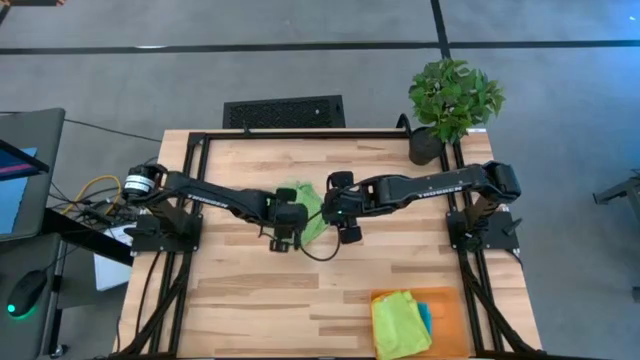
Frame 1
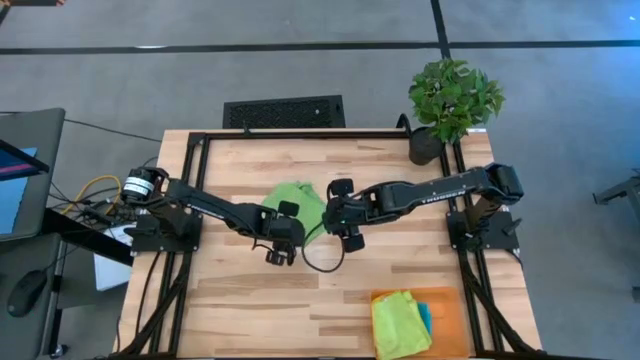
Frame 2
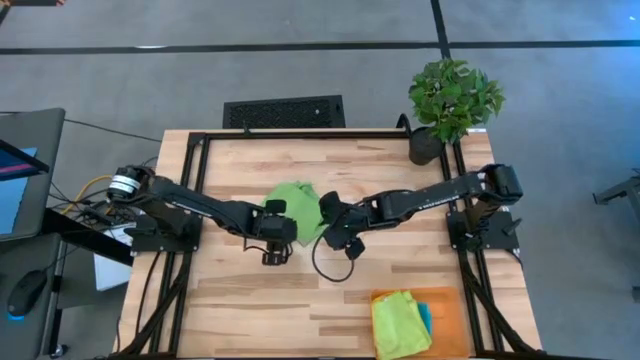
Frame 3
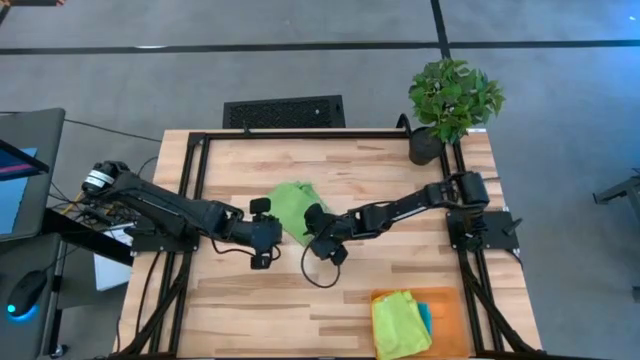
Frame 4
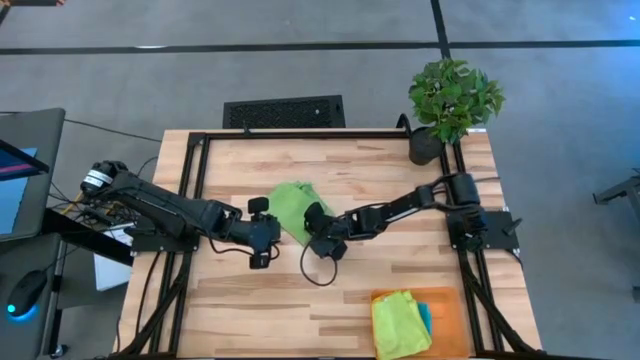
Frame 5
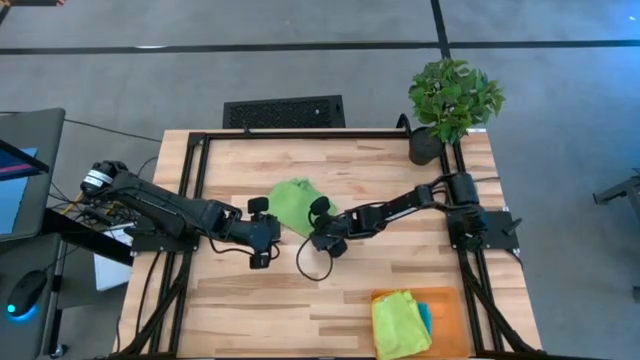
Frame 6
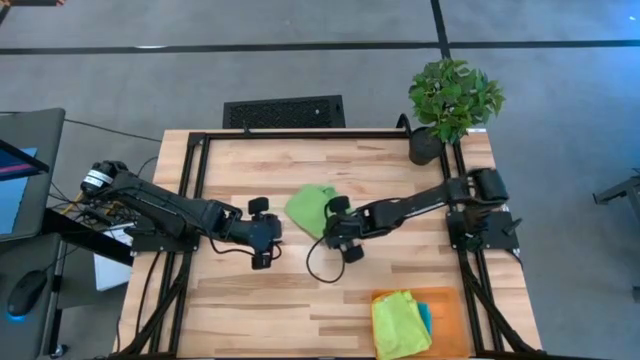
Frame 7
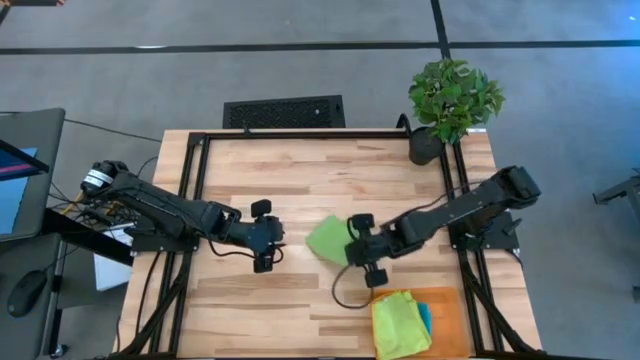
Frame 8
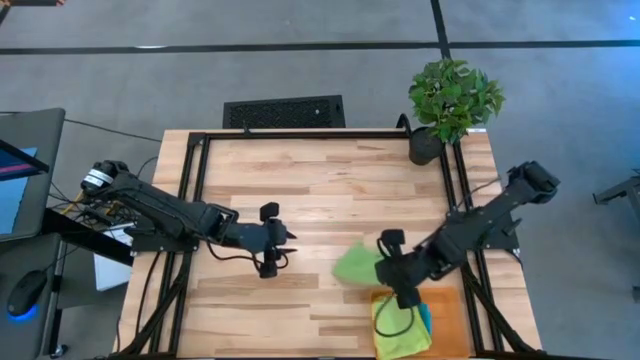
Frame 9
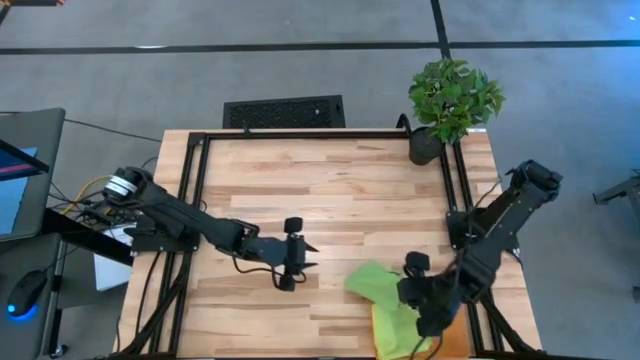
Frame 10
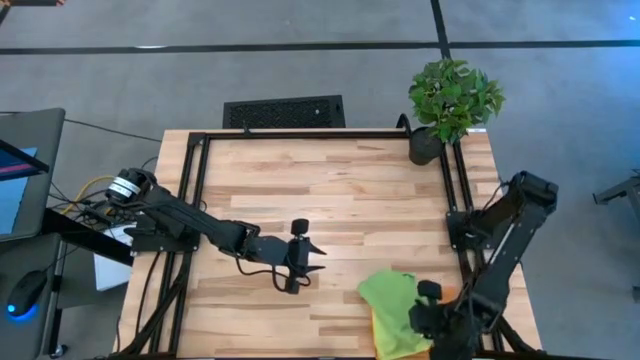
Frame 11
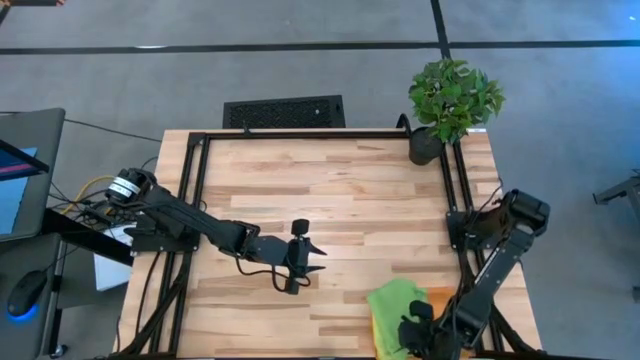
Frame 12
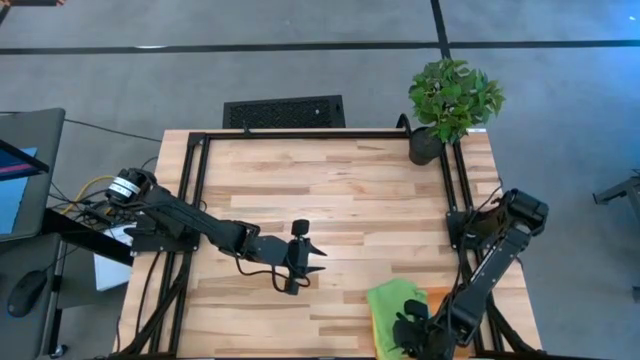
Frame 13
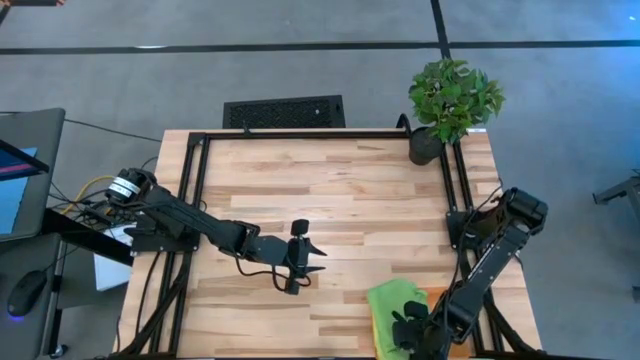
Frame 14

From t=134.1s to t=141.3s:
Task: Fold microfiber towels
Put the folded green microfiber towel into the orange bin

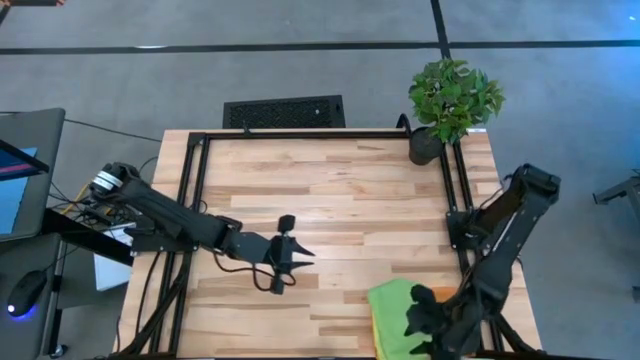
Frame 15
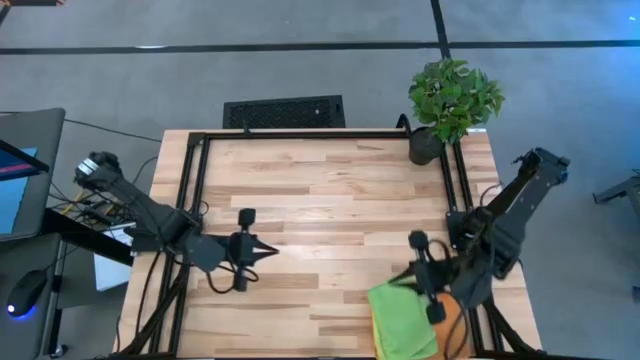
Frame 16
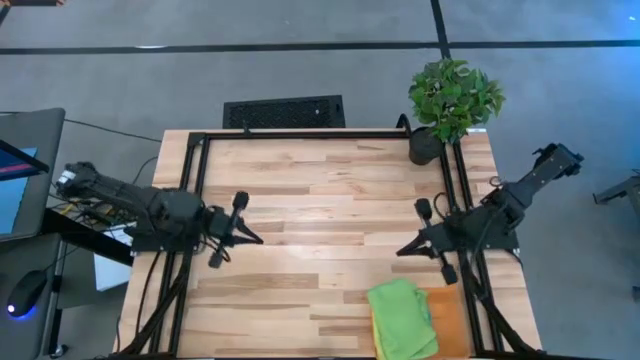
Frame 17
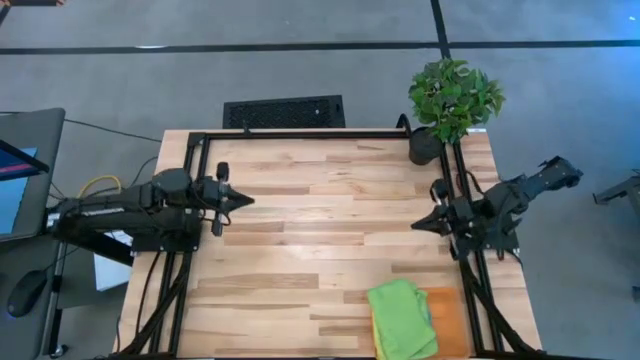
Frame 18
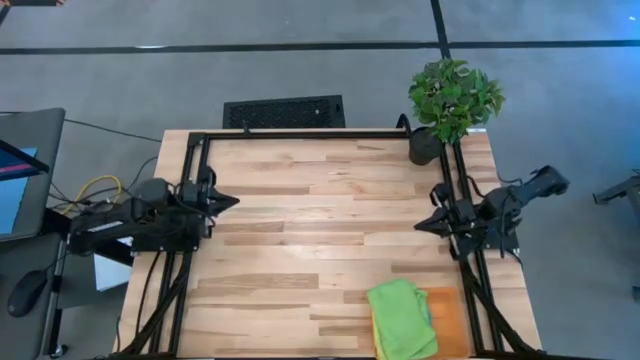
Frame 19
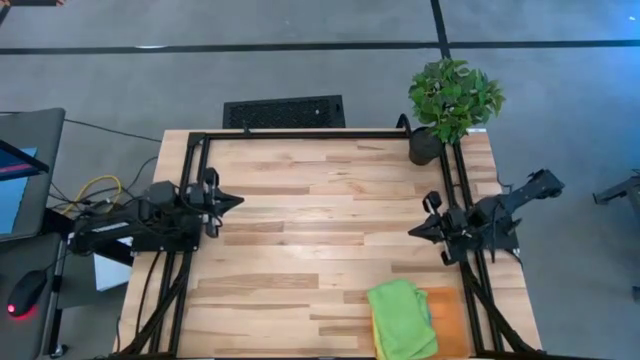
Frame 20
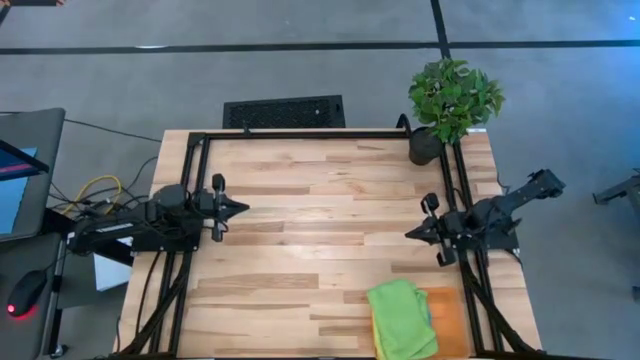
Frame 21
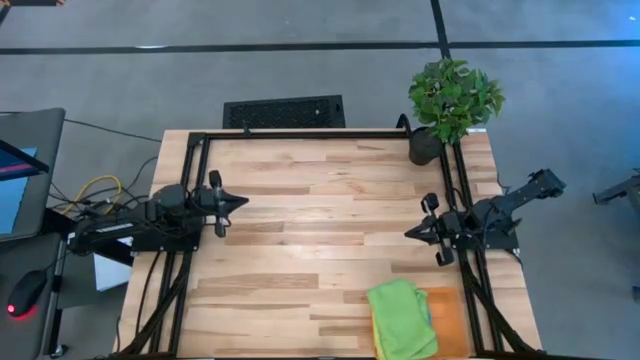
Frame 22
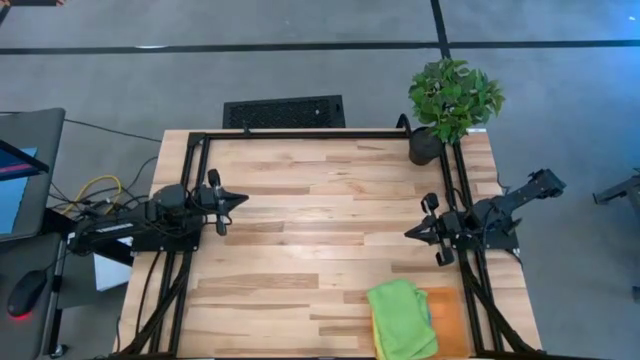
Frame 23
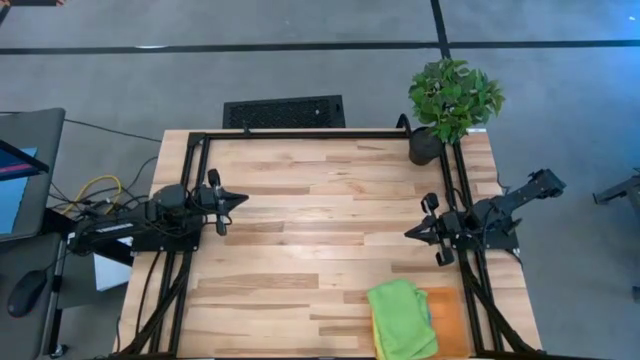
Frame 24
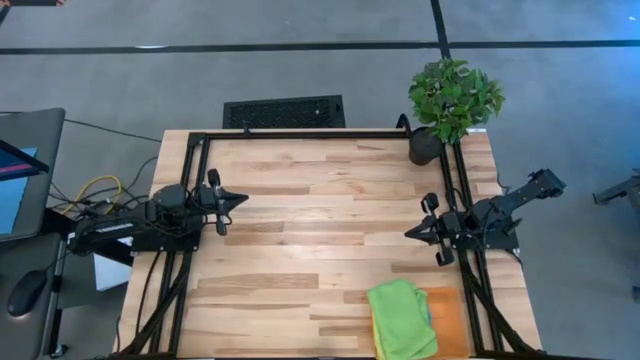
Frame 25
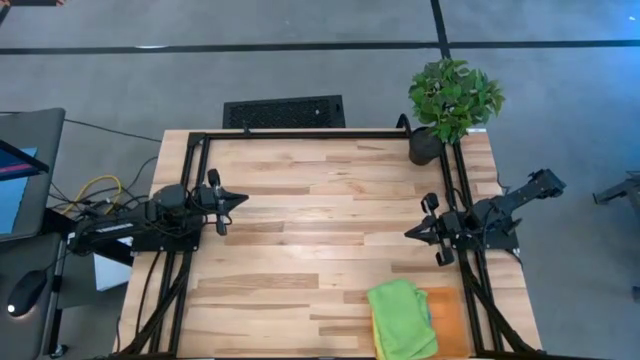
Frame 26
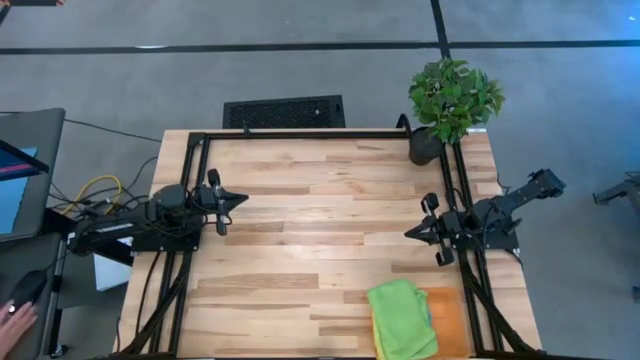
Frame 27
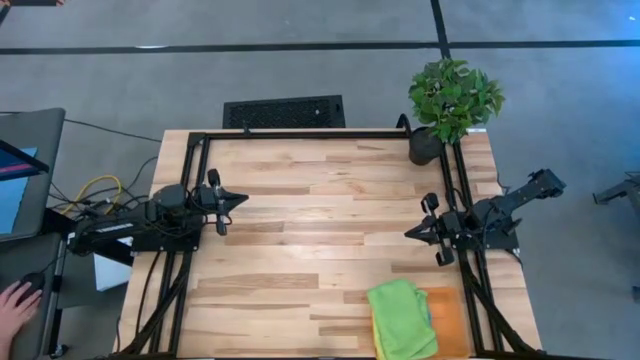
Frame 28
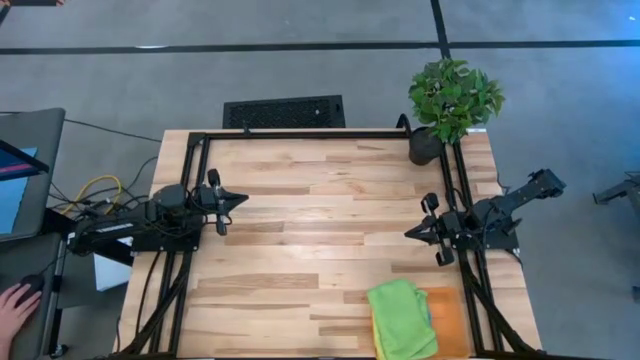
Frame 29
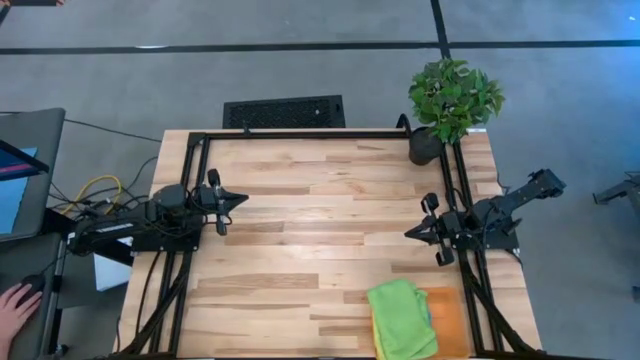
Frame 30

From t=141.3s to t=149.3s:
Return to Home Position

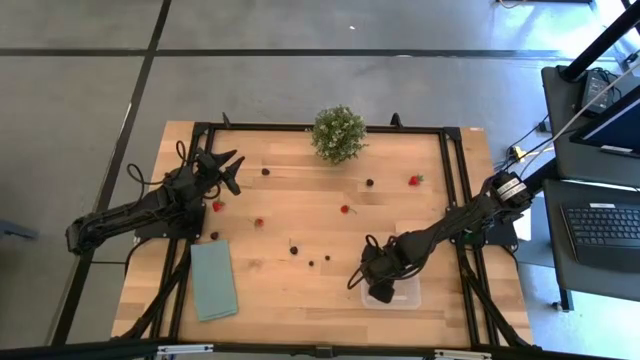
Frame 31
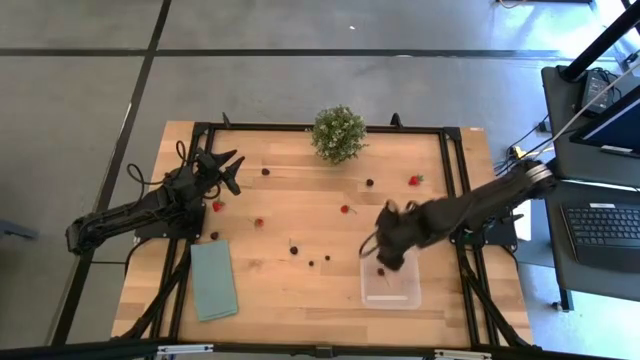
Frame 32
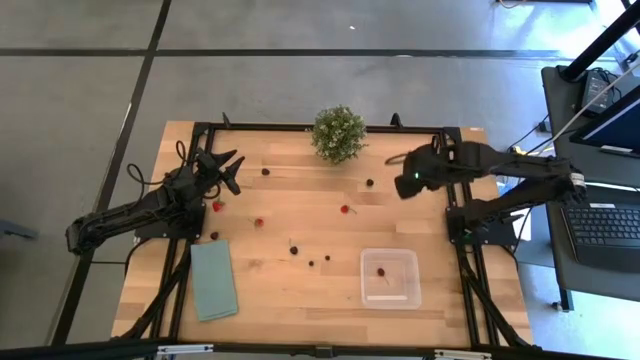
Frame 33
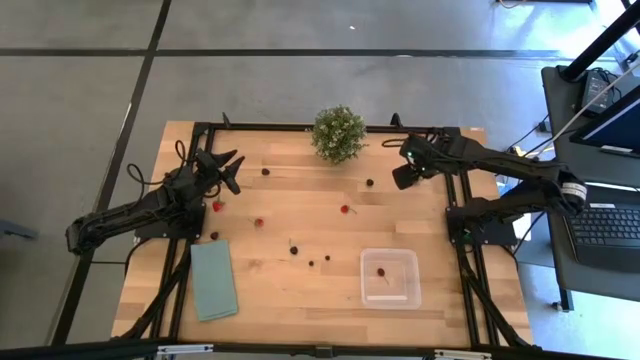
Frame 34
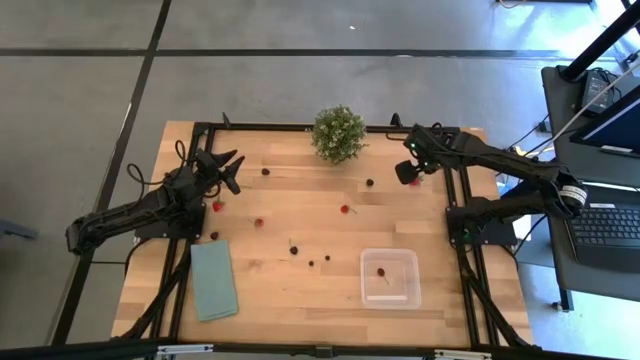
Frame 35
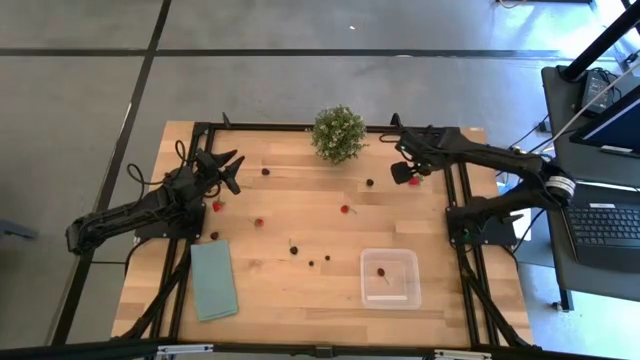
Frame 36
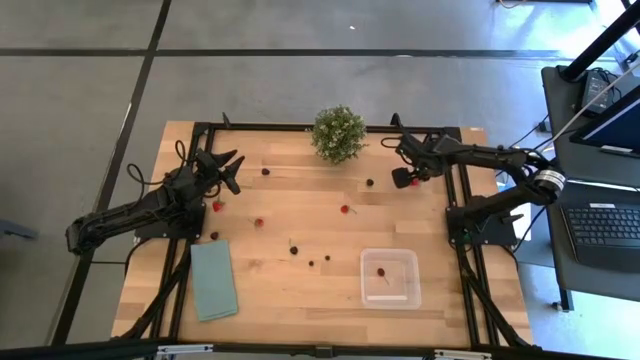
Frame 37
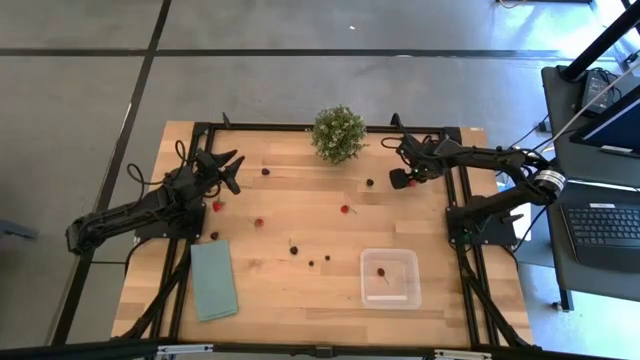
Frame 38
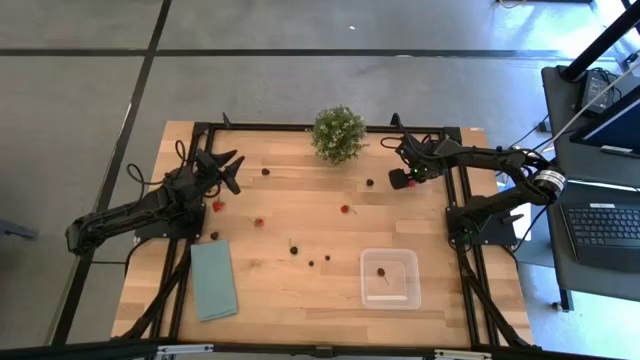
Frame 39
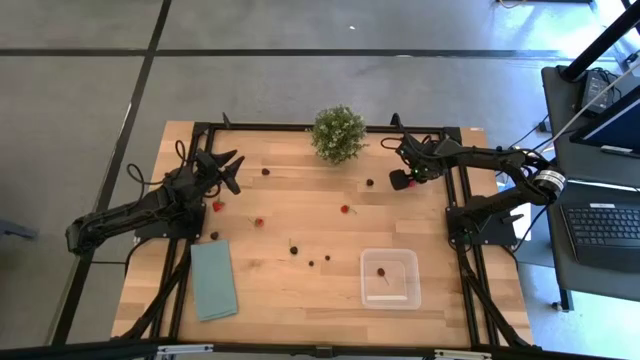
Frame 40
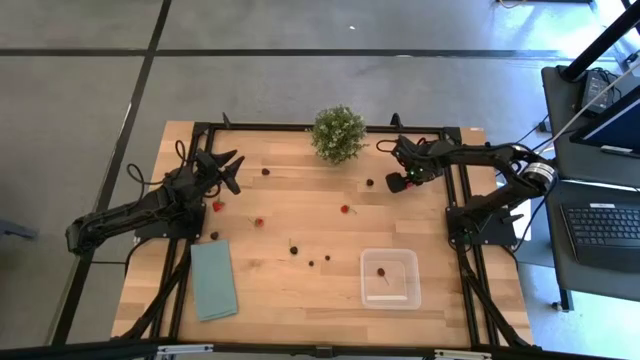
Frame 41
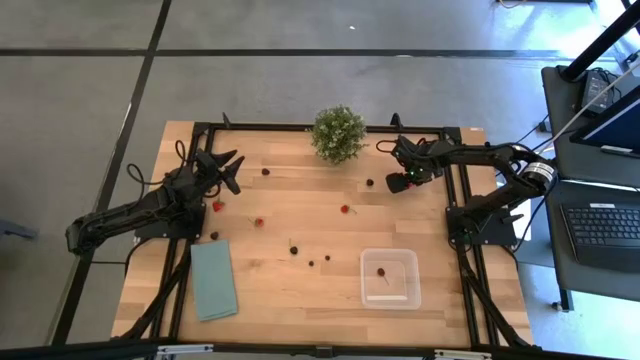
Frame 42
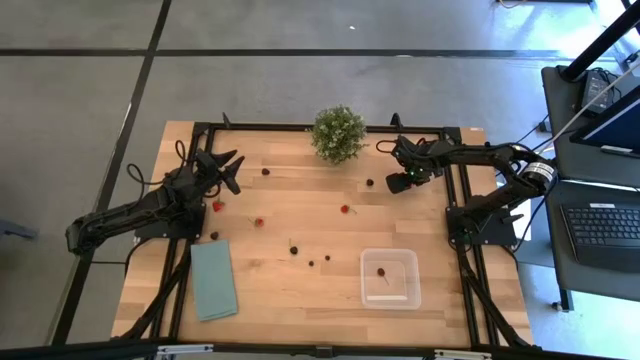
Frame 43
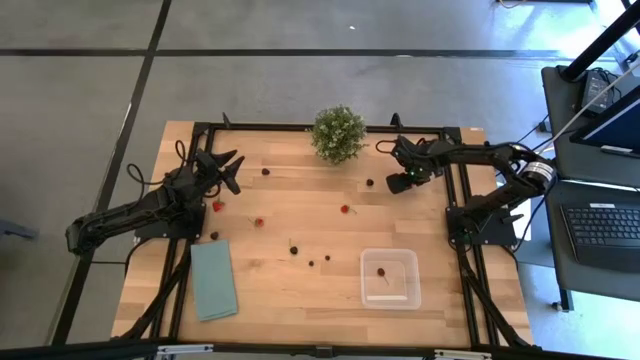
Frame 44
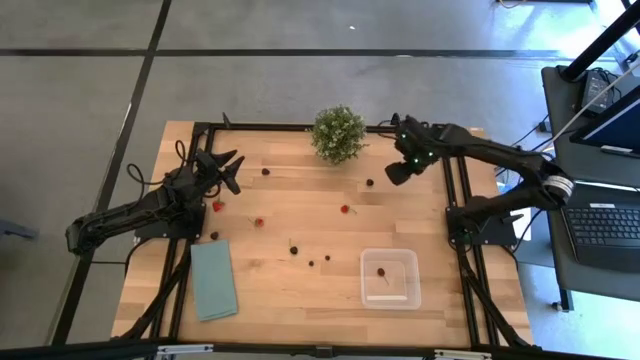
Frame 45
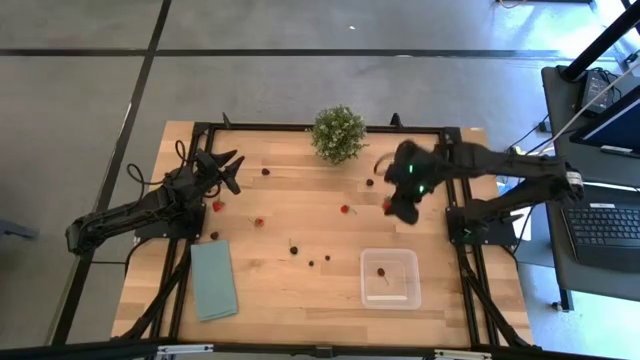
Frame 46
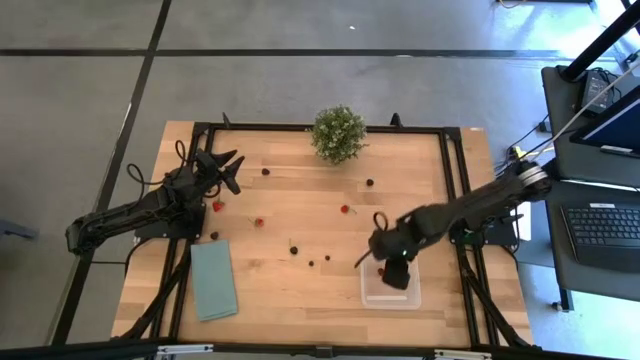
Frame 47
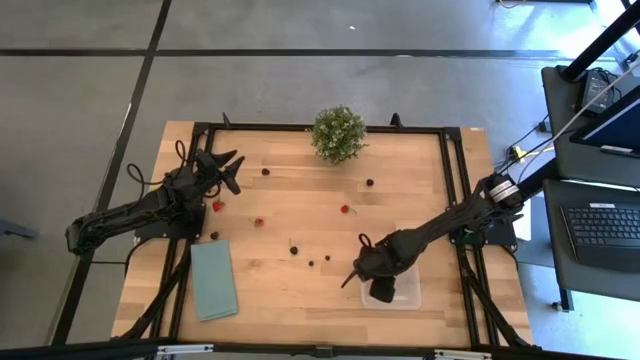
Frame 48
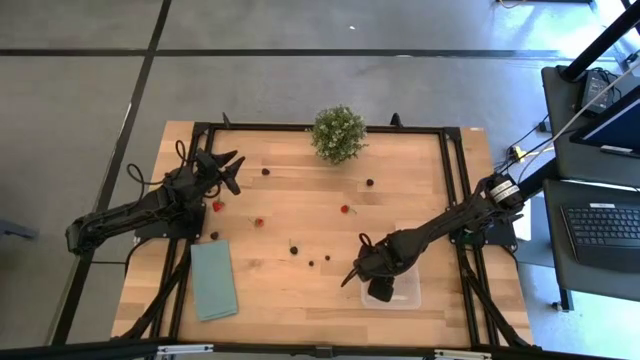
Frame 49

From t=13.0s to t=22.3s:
Task: Pick and placing Produce into tupperware
Put the strawberry into the bin
